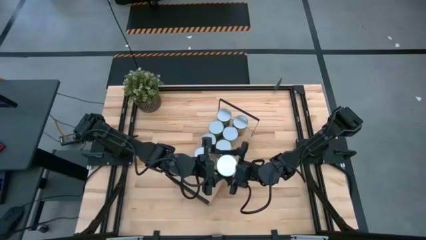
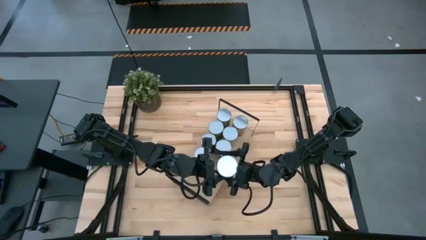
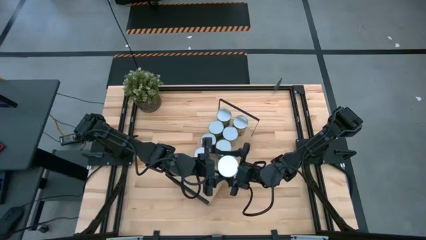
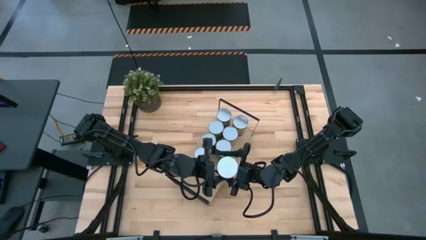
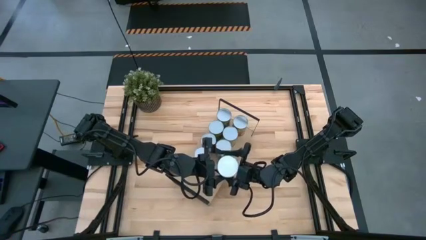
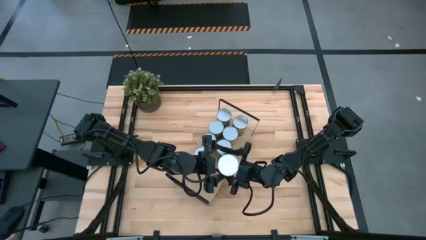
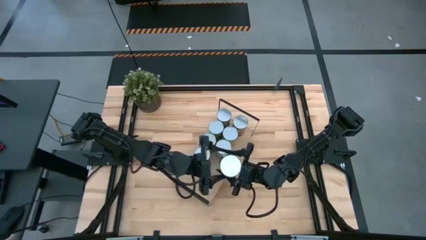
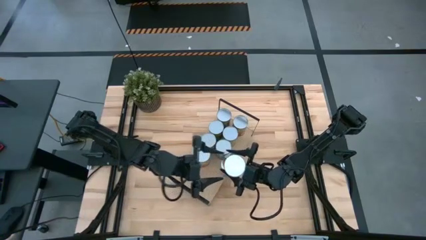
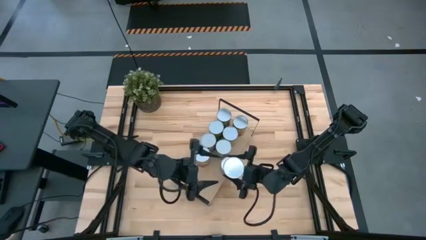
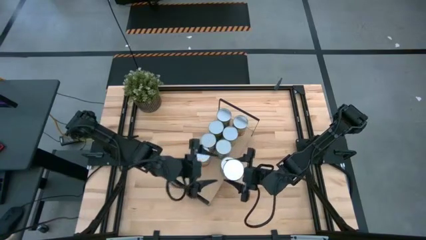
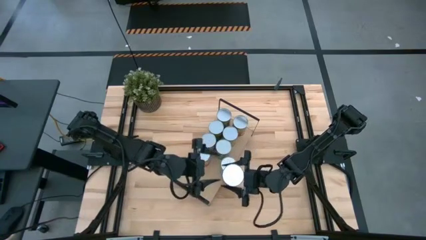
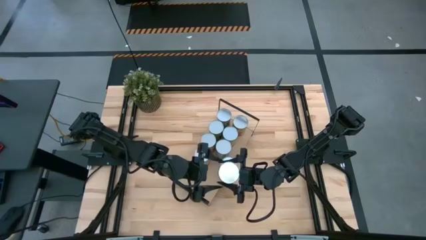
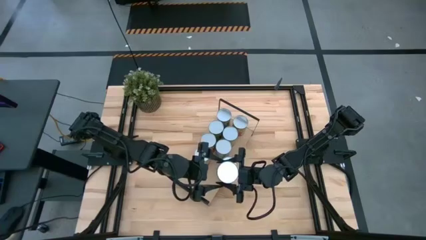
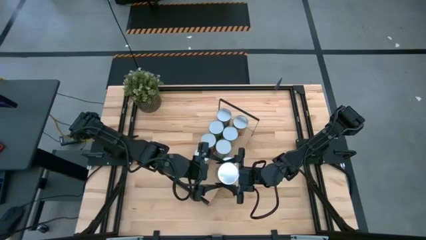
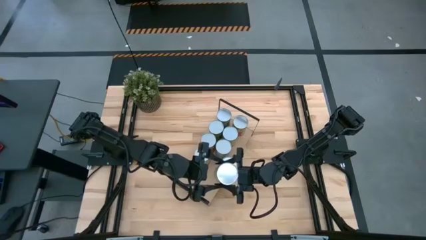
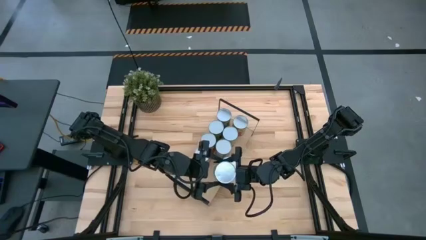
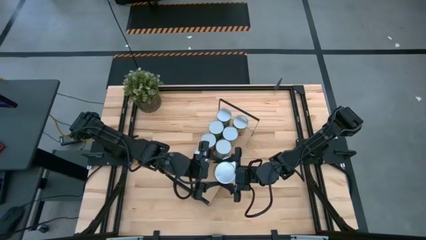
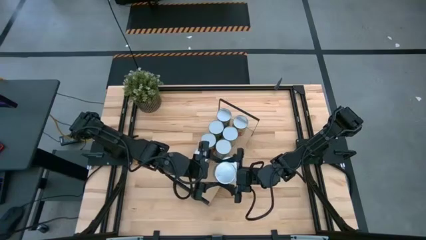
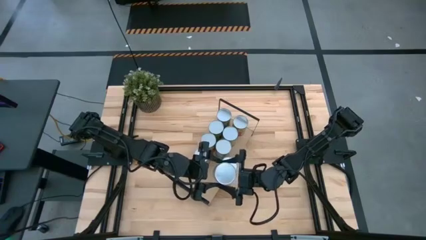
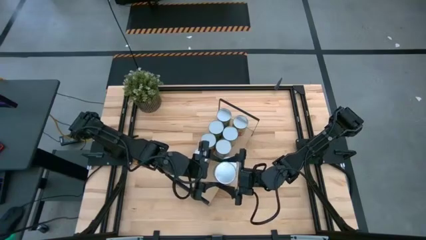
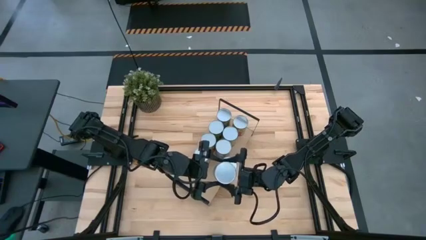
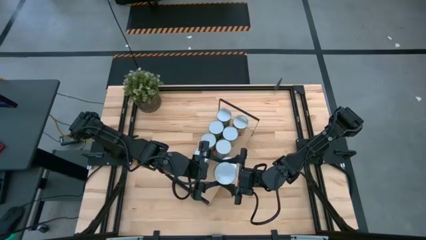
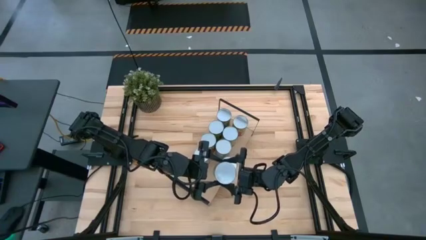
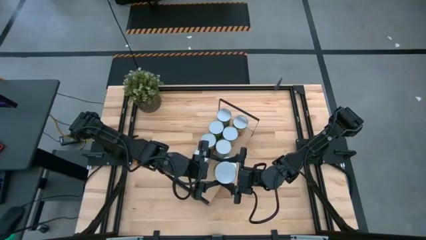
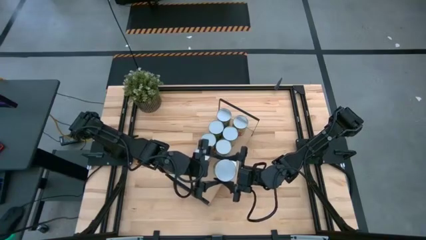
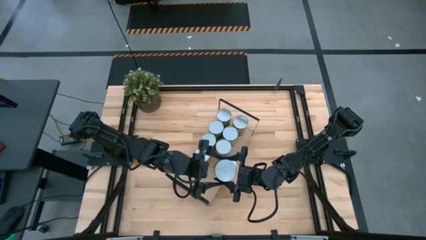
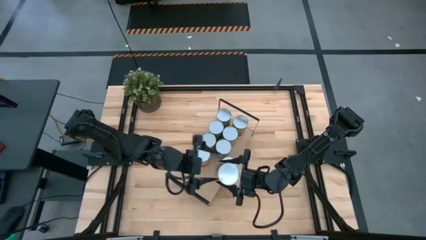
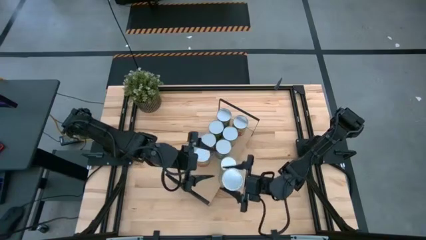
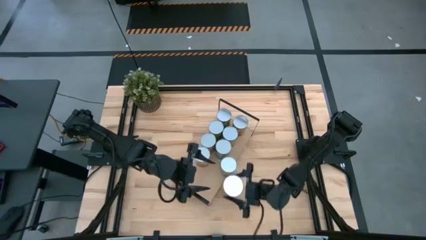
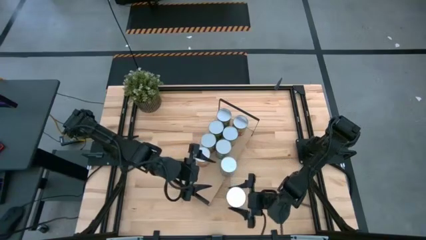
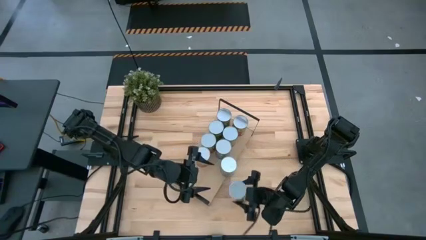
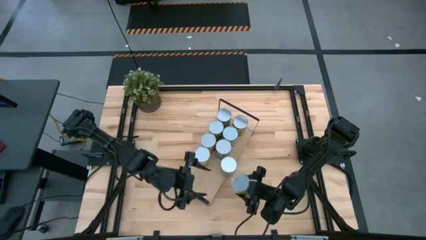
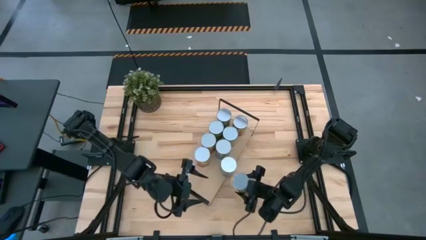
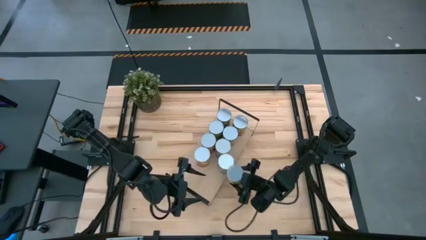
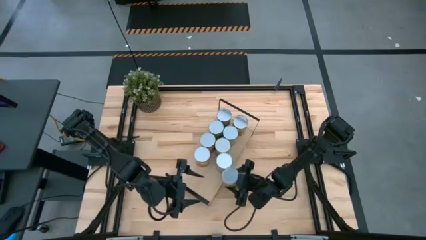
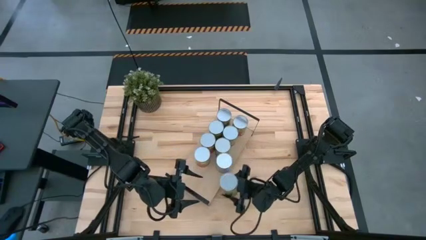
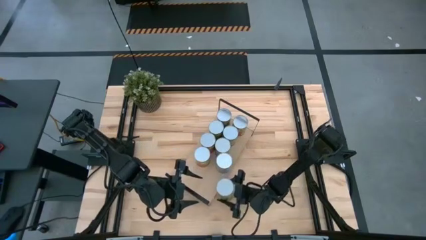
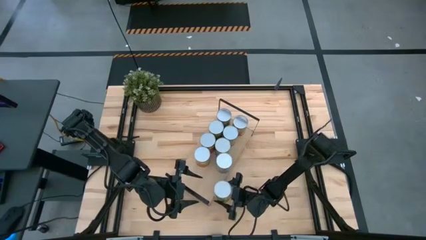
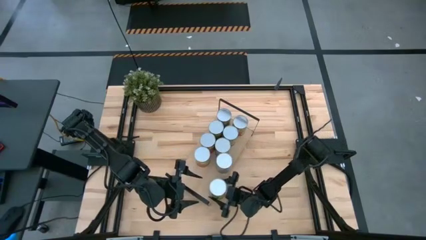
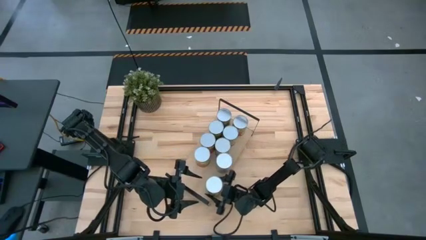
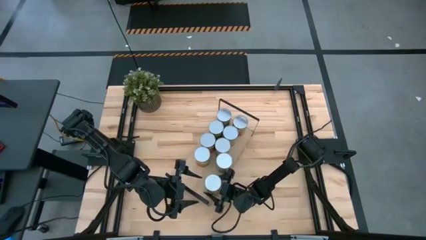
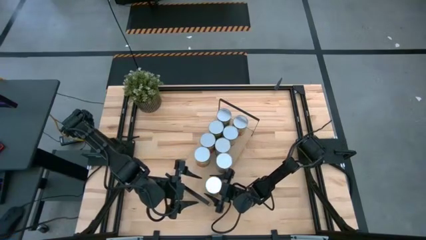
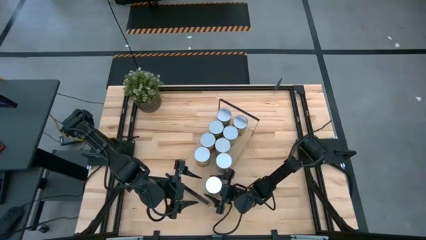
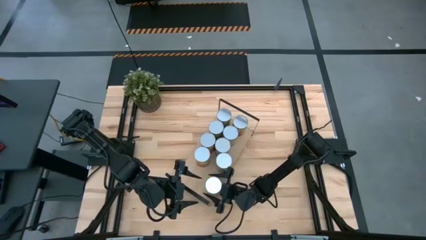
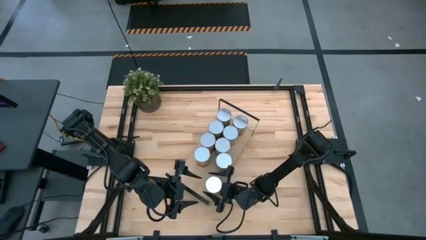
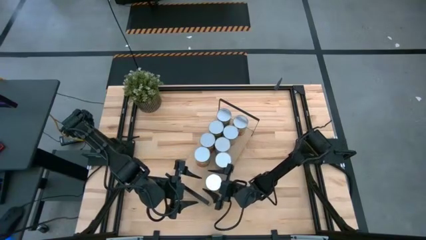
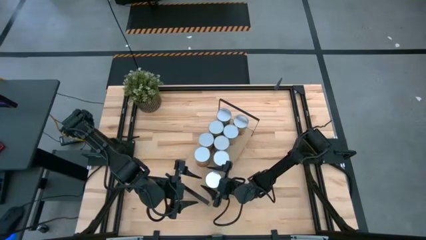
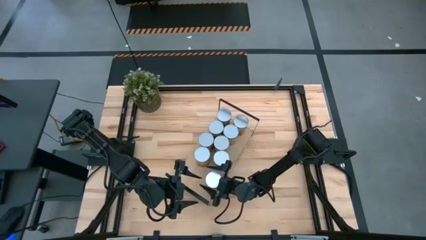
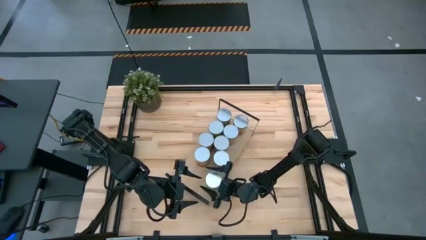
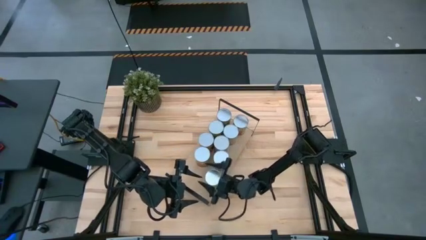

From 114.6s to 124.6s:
Task: Pick and place cans onto a shelf
Put the canned pears on the shelf

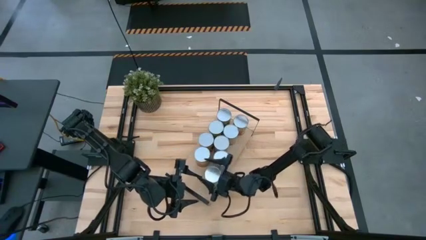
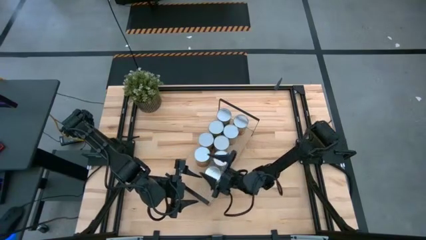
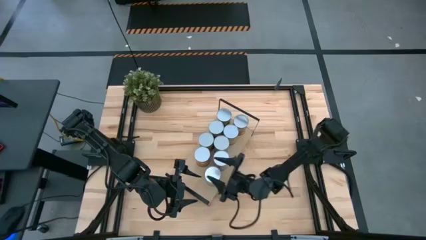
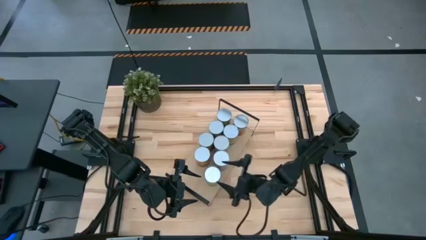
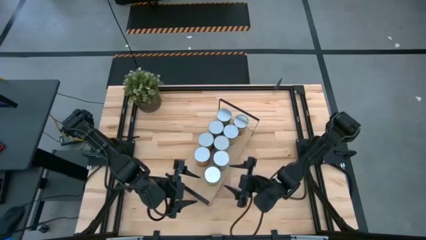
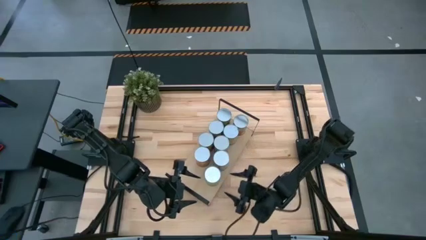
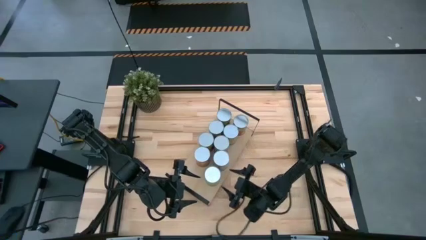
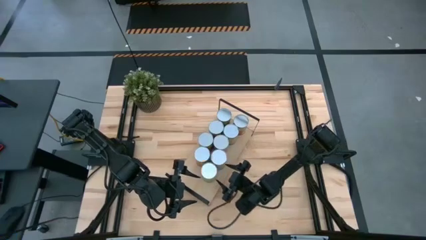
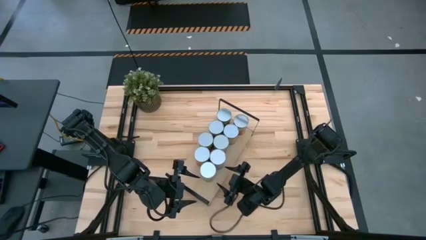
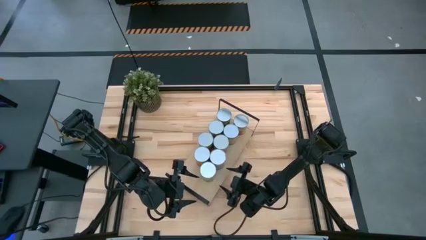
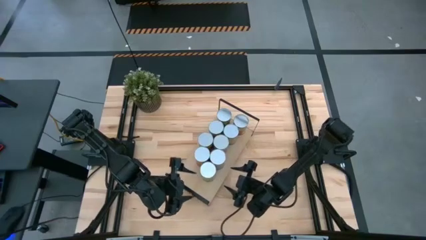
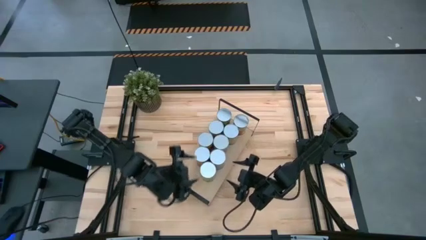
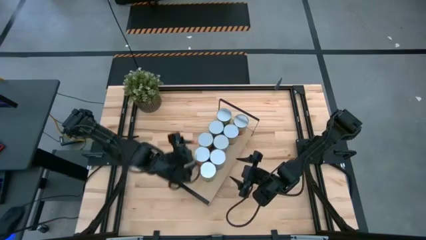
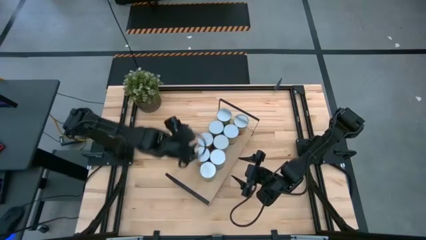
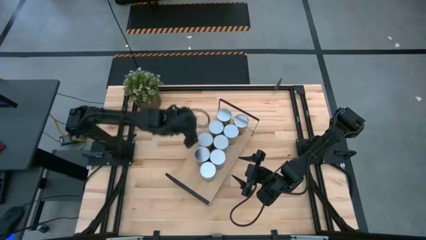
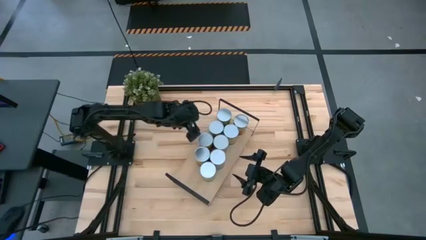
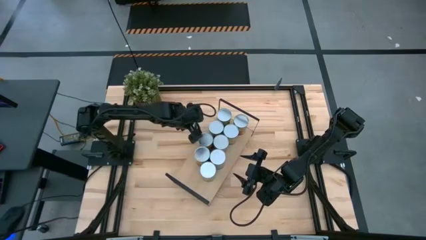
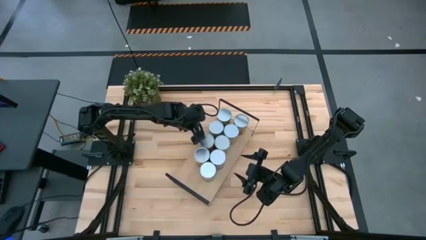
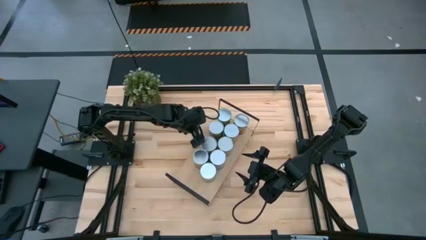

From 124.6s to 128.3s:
Adjust the cans on the shelf

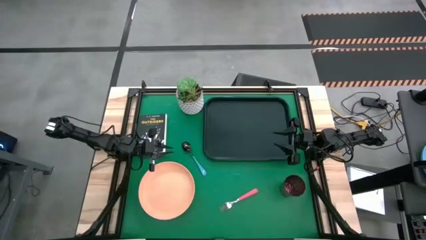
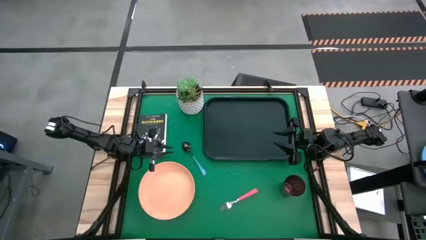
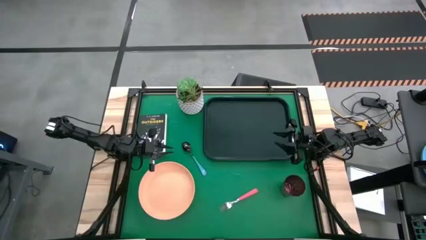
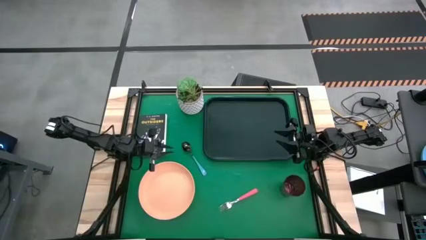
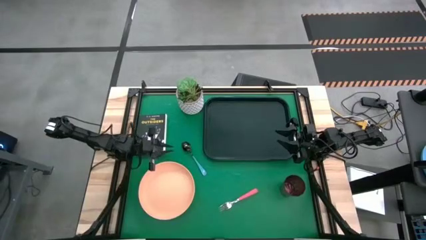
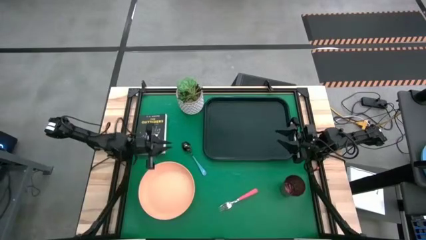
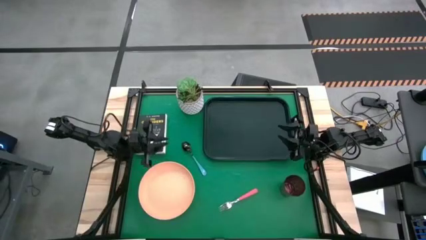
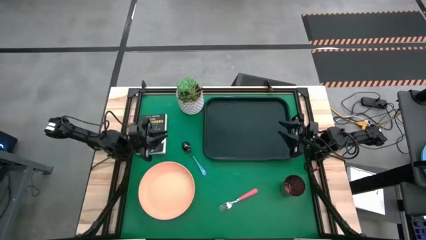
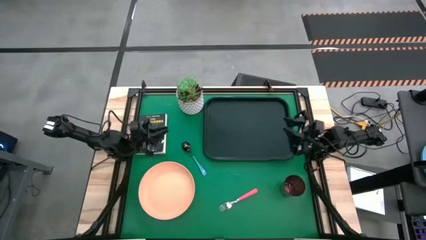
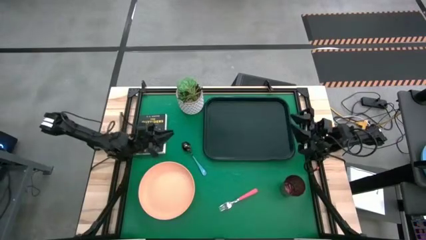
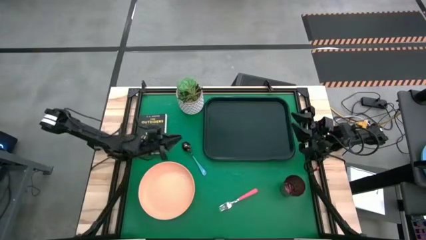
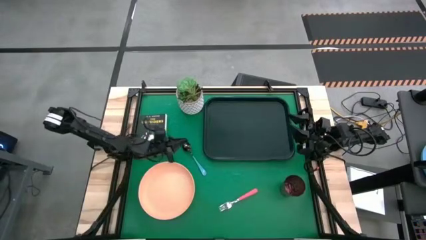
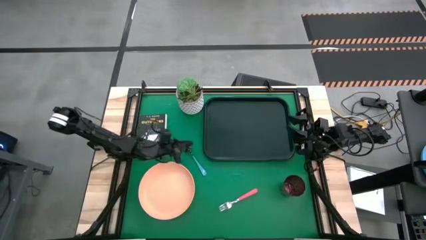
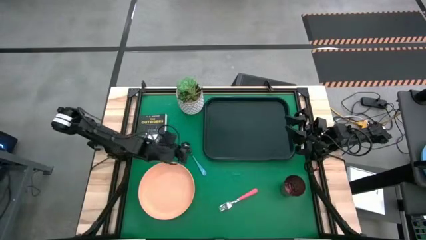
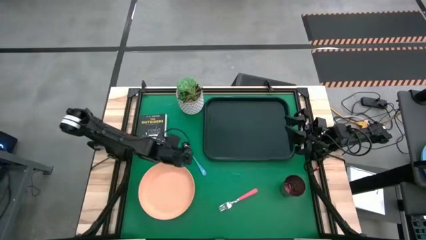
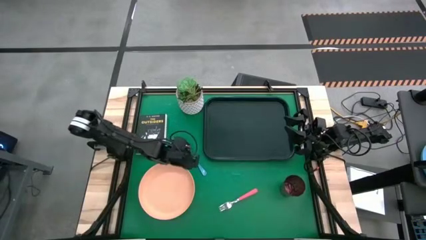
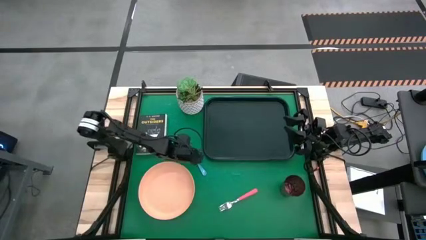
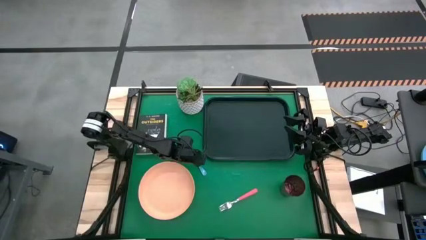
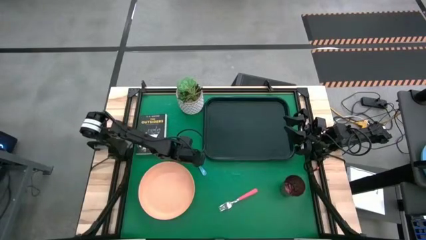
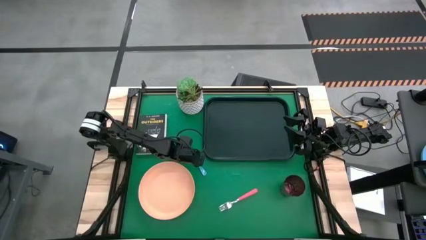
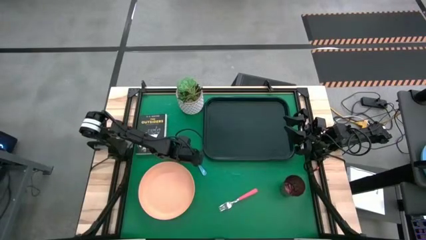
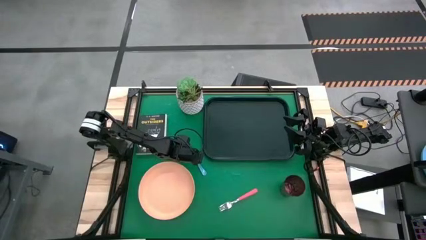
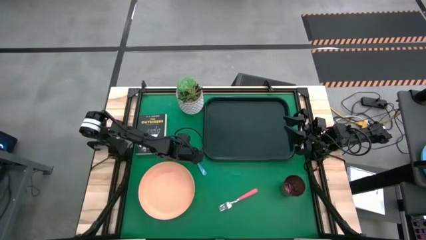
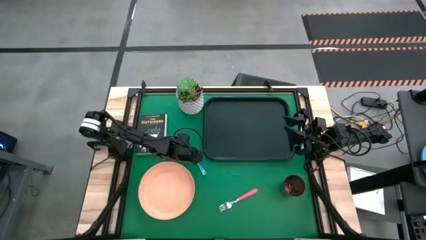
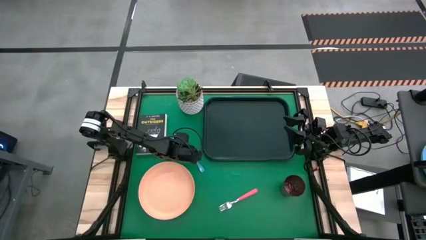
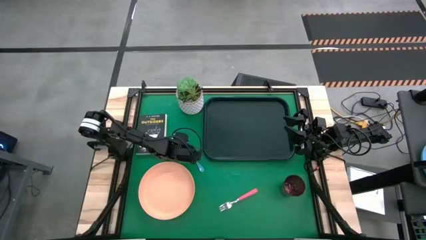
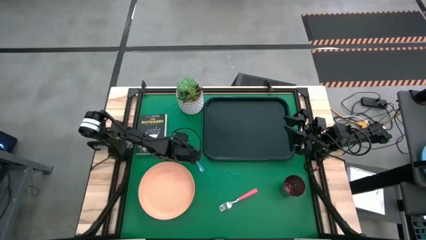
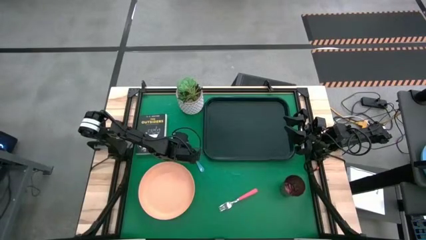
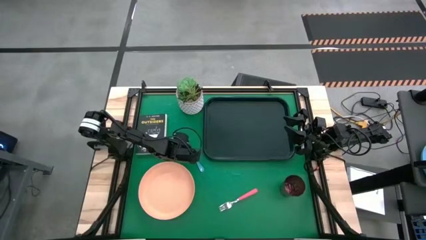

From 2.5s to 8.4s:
Task: Pick and place plate/cup/fork/spoon on tray
Put the blue spoon on the black tray
